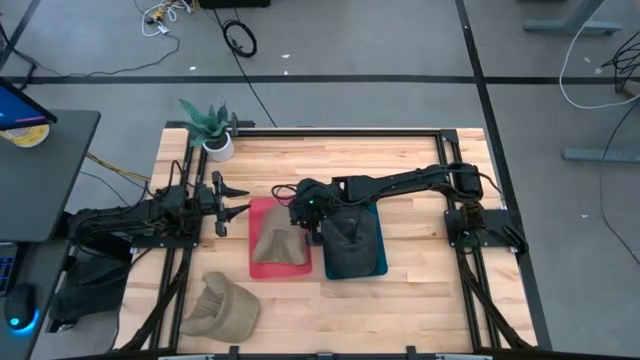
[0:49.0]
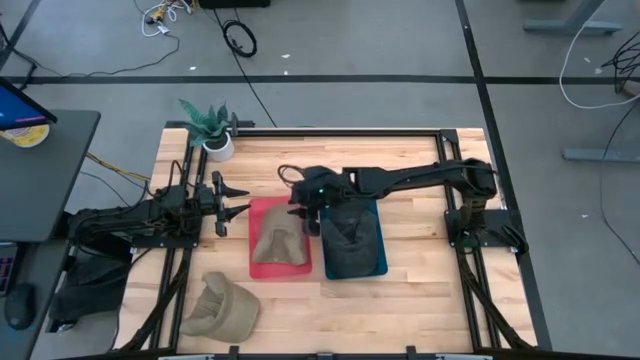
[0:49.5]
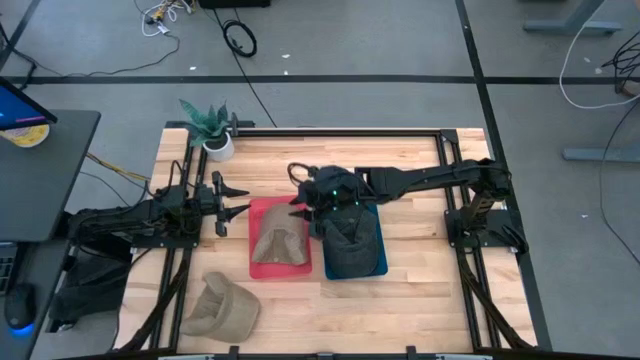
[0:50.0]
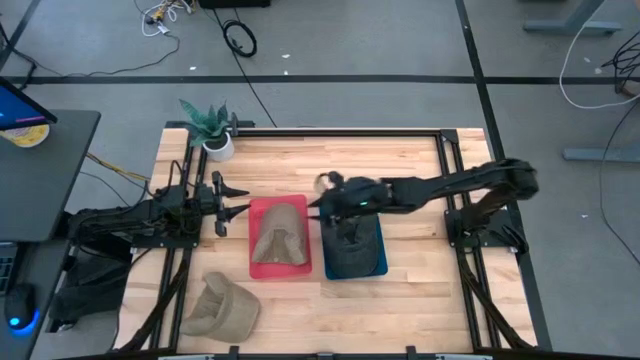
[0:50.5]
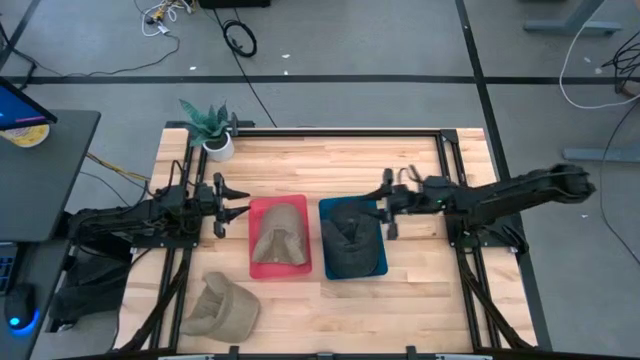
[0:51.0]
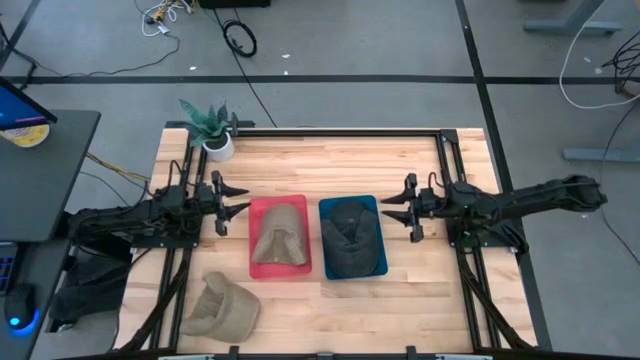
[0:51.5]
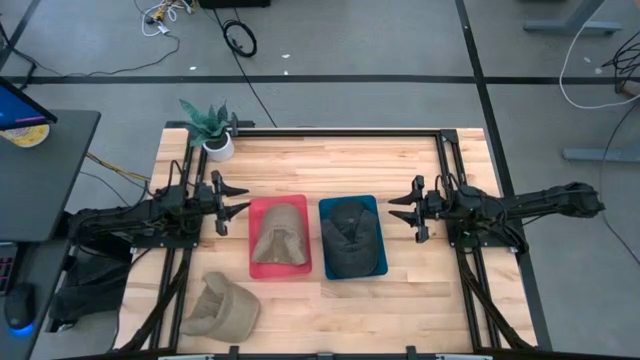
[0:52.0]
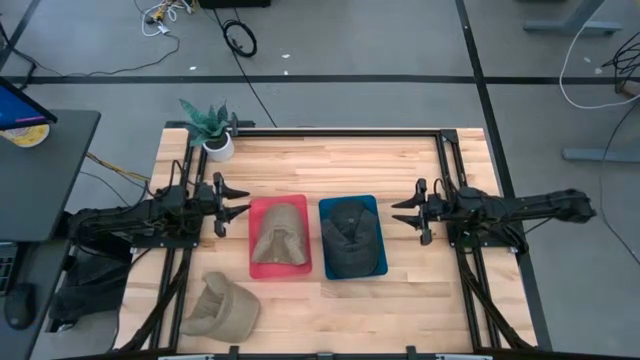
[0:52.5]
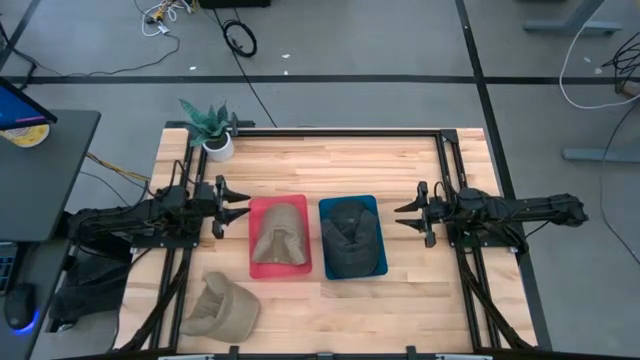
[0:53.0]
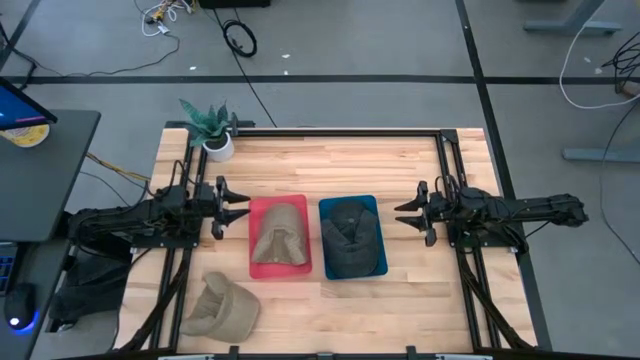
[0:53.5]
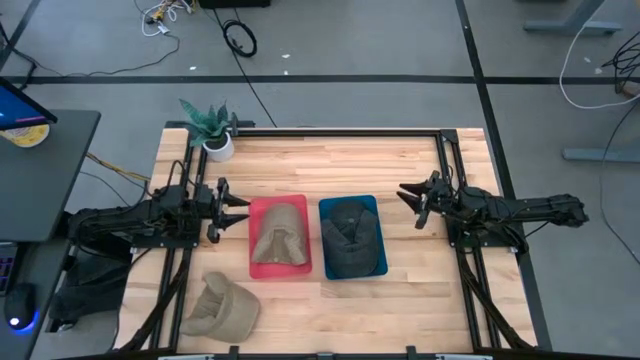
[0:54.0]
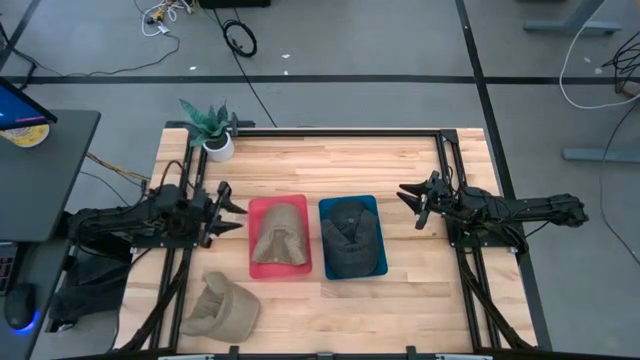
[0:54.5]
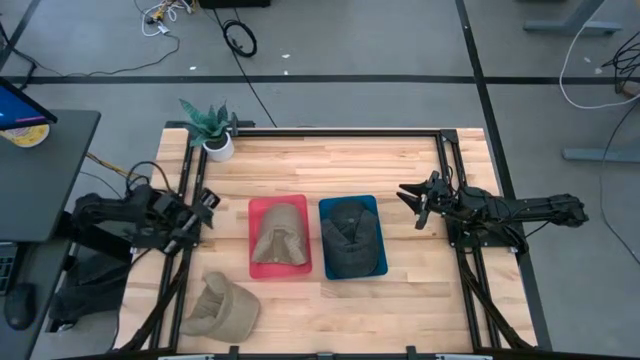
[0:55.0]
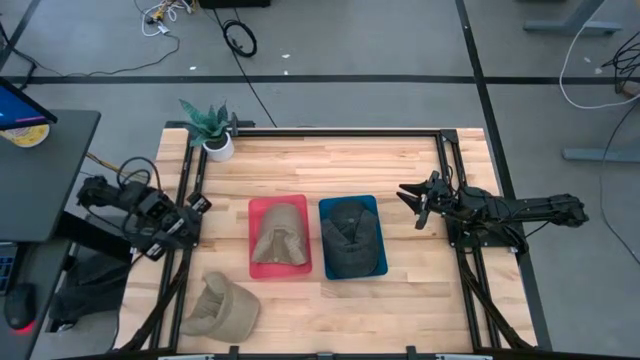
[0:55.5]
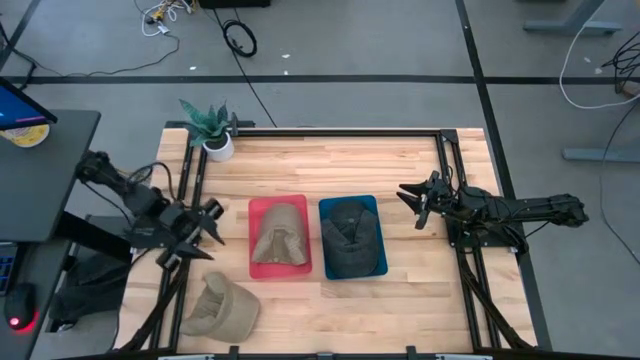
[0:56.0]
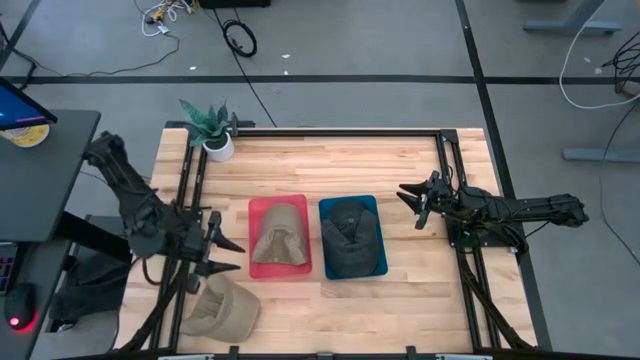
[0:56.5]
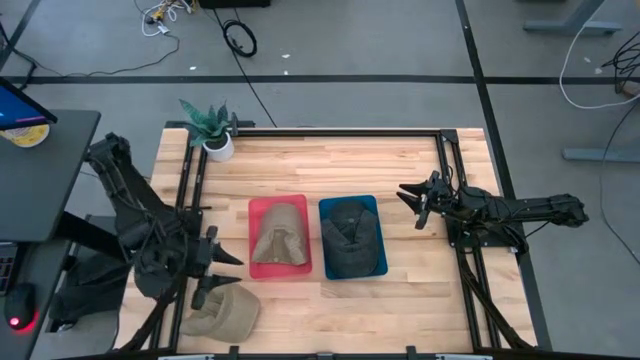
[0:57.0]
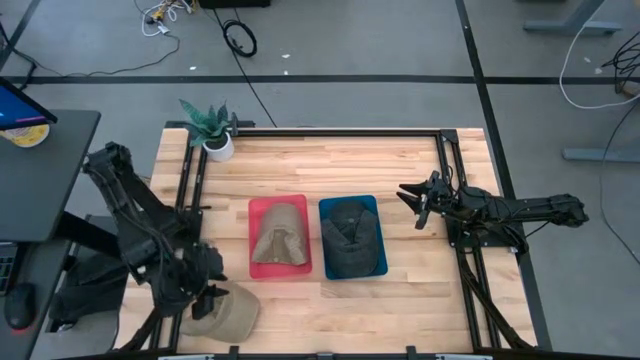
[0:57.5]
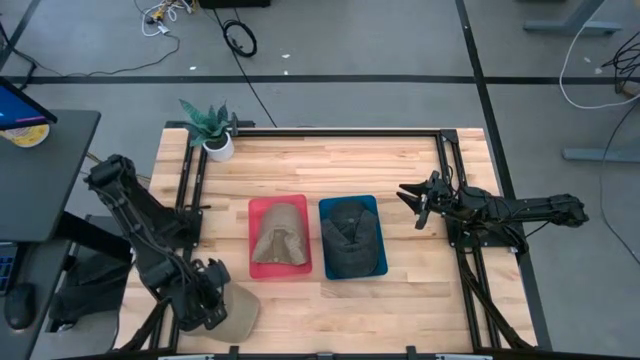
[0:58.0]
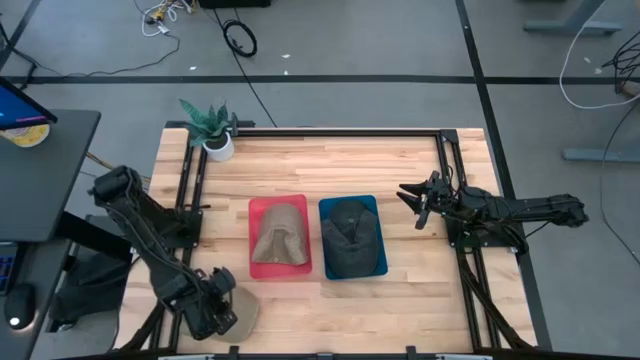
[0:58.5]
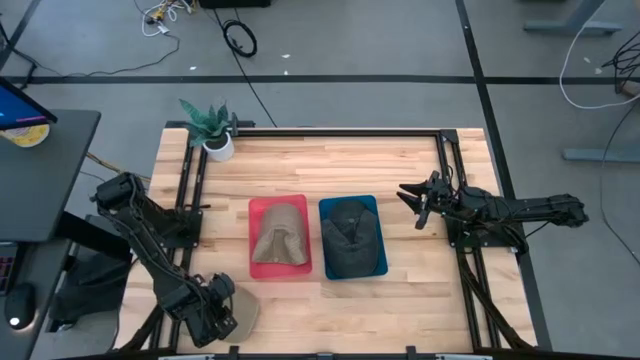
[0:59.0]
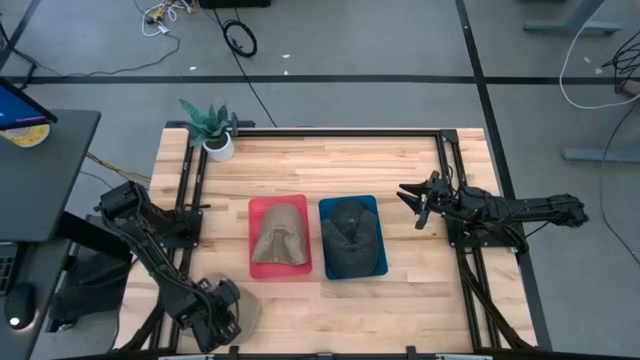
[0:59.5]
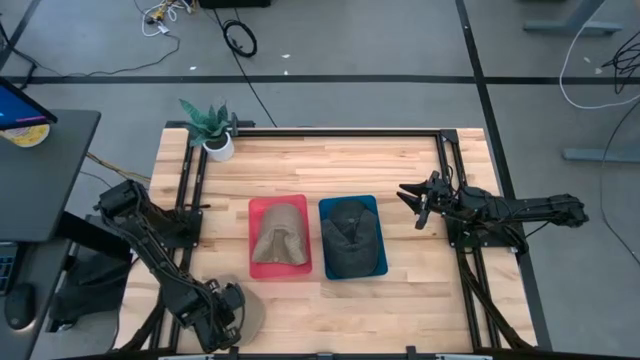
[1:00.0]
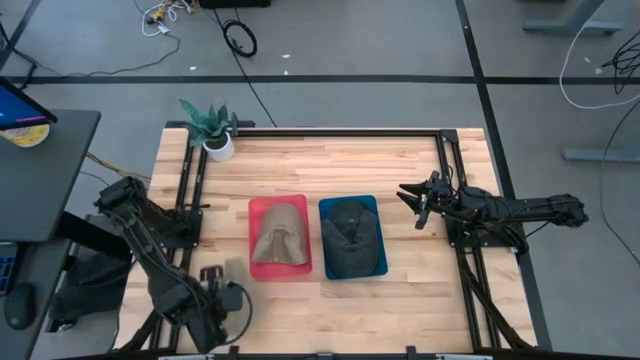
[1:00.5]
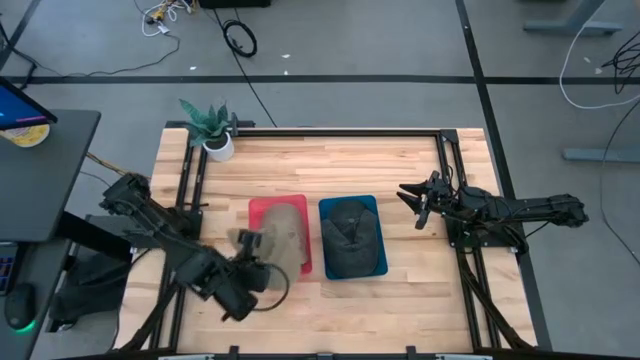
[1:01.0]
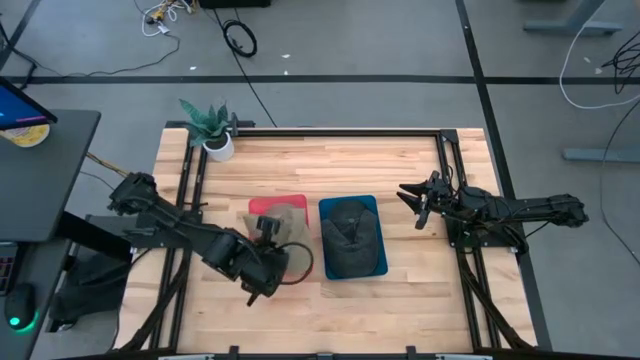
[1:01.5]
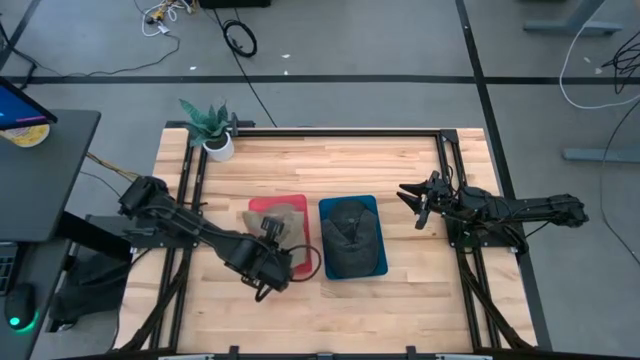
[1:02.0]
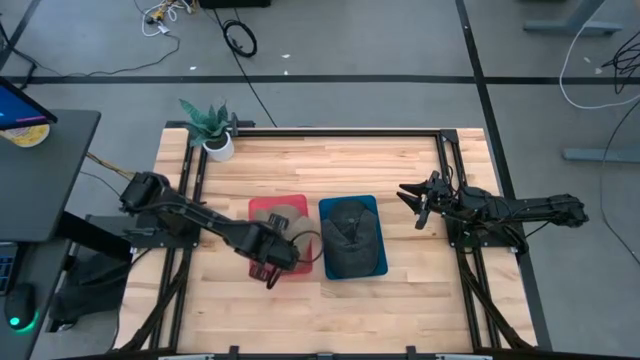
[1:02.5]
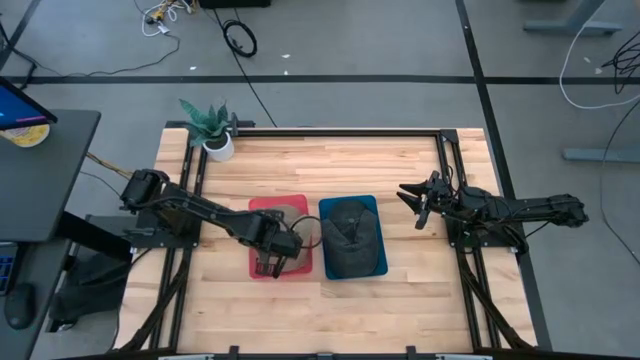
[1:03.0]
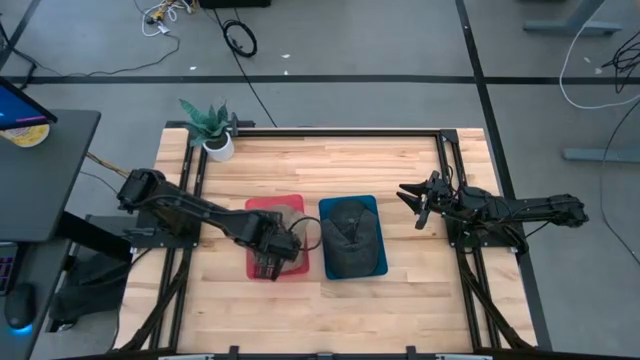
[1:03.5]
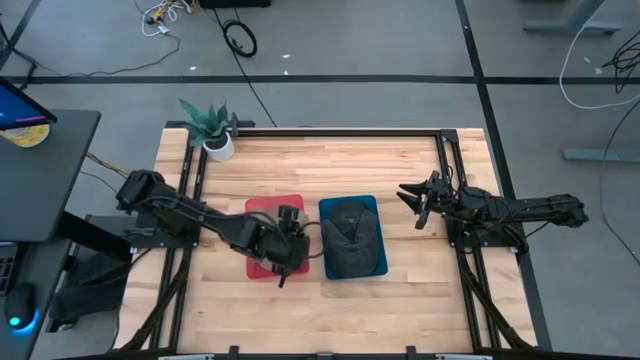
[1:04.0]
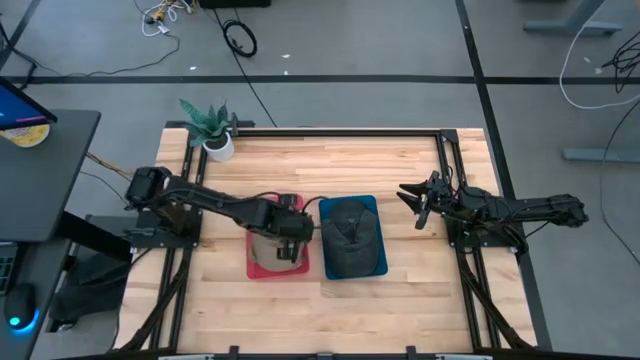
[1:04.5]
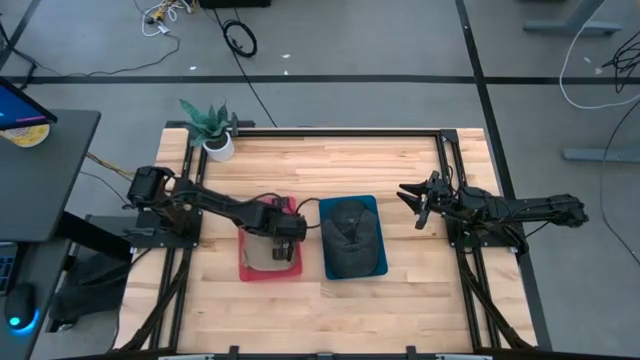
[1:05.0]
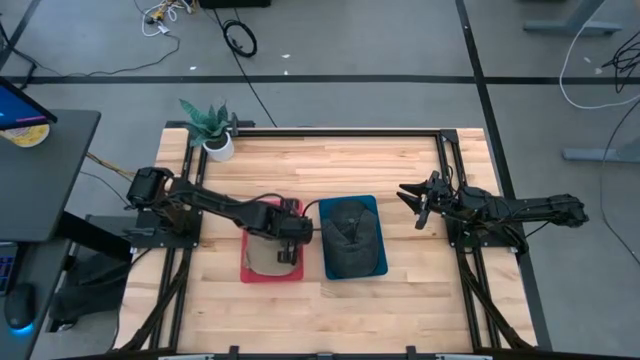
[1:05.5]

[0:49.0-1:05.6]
Task: Pick & Place hat
Put the brown cap into the red bin

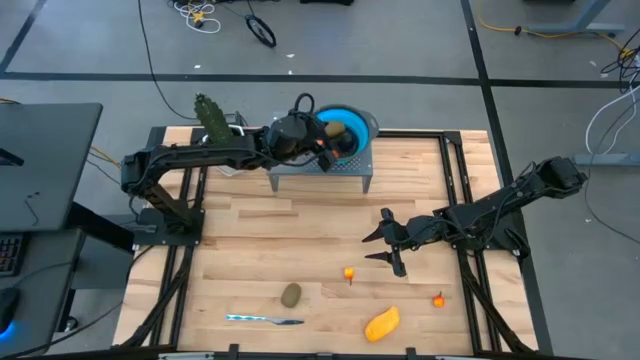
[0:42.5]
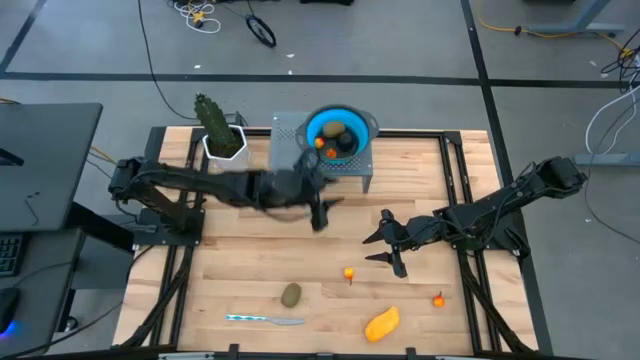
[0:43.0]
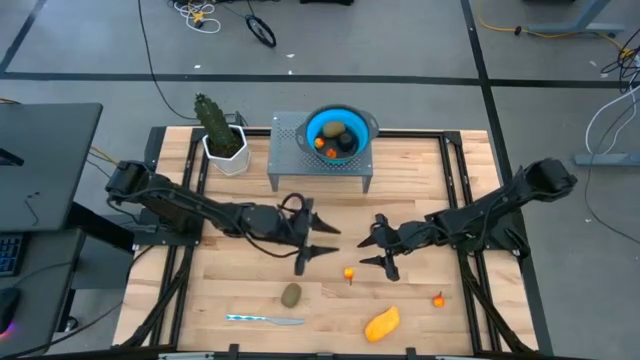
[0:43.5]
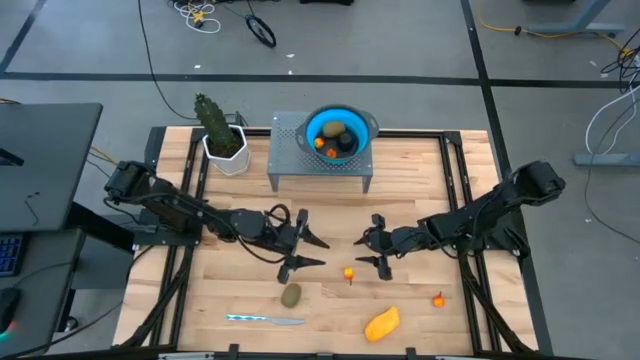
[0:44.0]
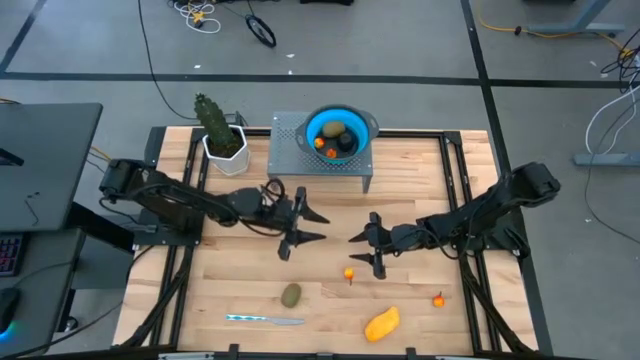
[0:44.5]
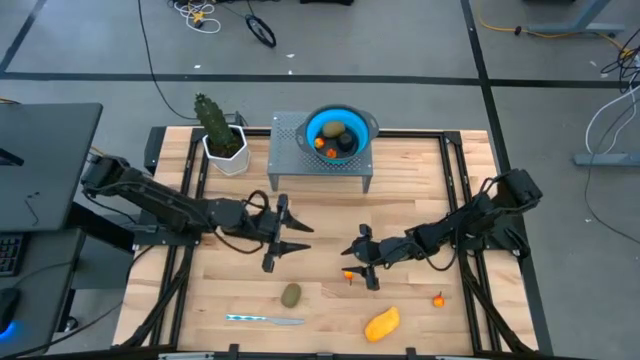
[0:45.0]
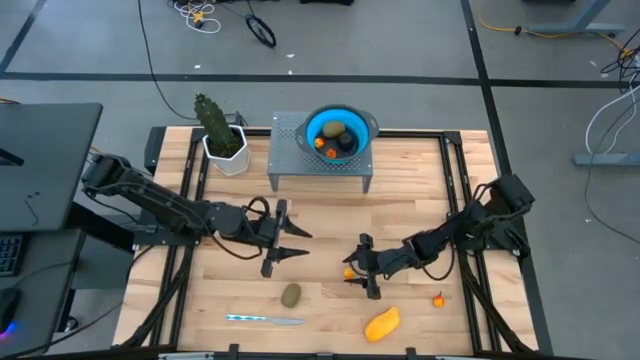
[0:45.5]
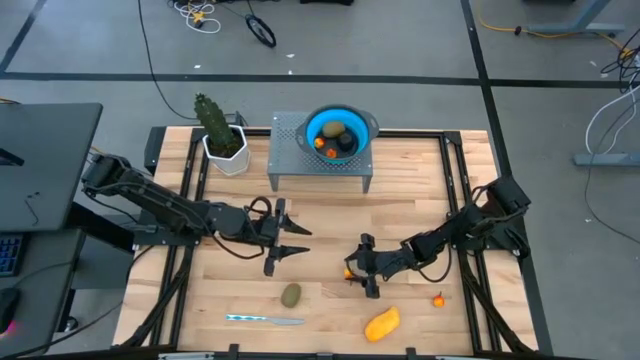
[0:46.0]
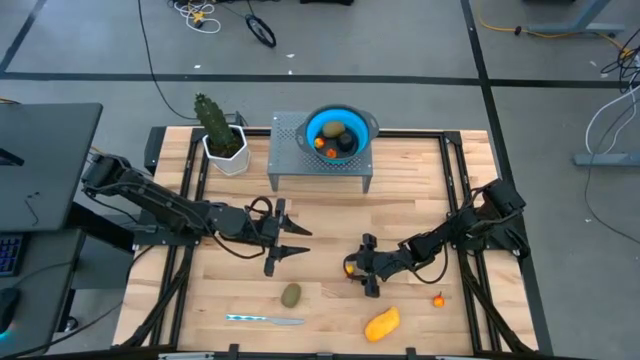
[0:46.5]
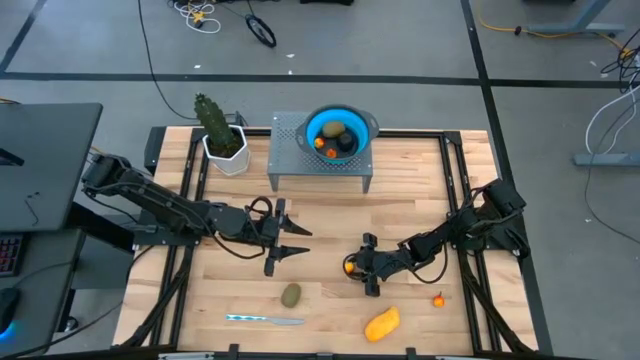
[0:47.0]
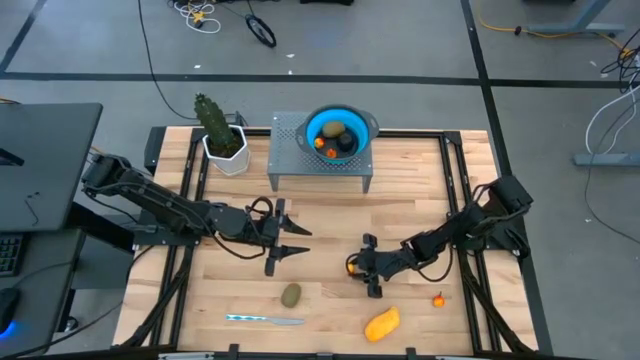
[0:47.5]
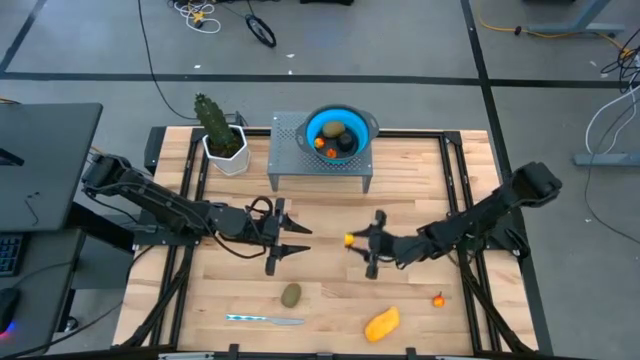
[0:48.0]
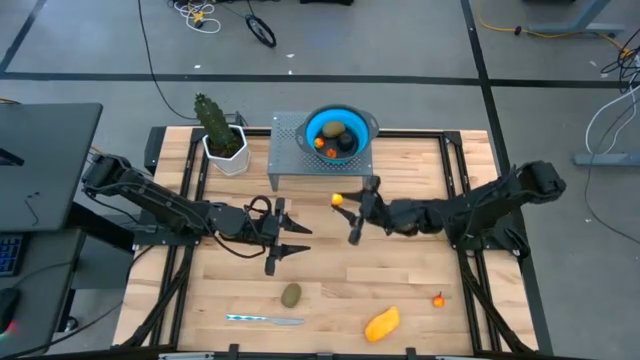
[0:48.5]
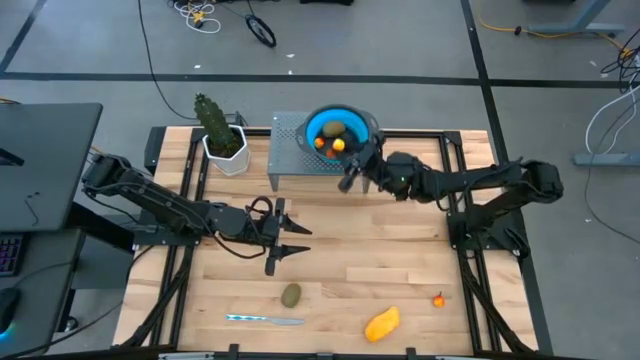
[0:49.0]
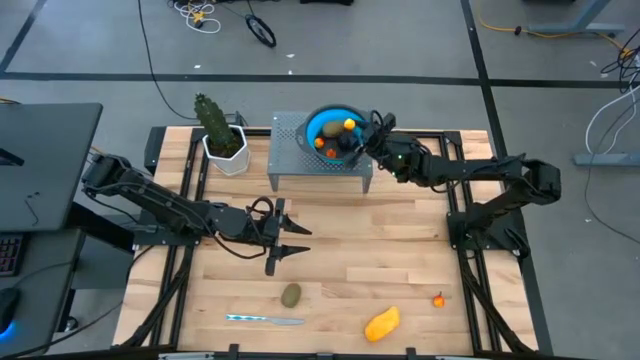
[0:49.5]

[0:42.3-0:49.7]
Task: Pick & Place Fruit
Put the orange peach in the blue strainer bowl on the shelf
